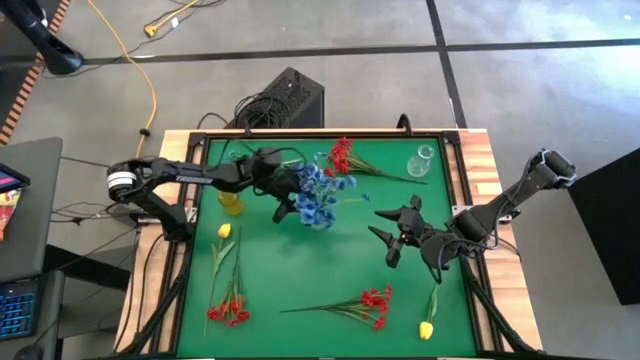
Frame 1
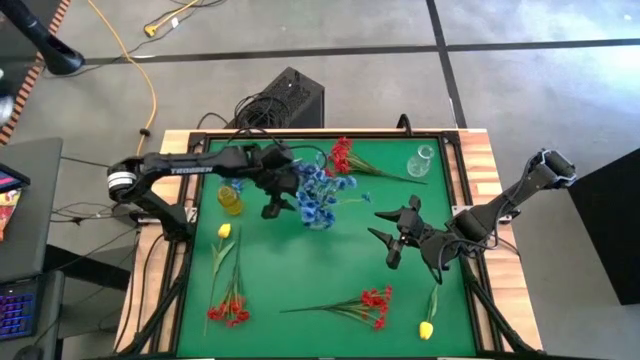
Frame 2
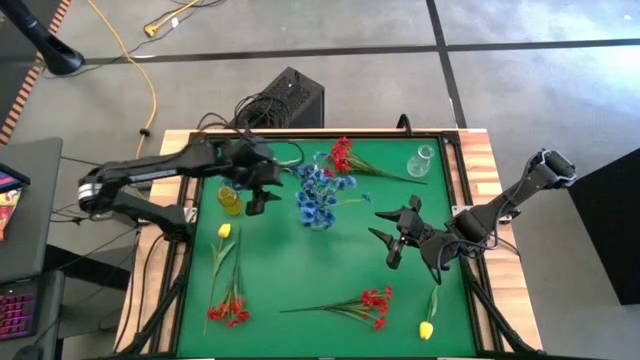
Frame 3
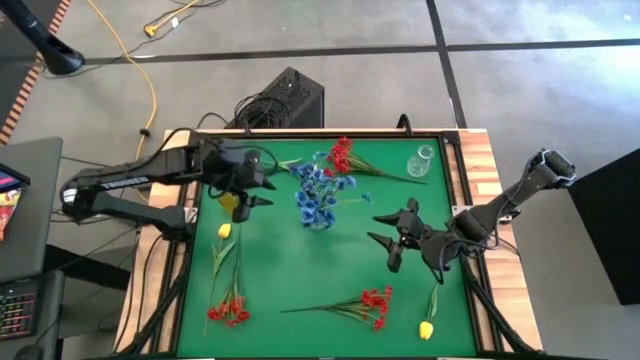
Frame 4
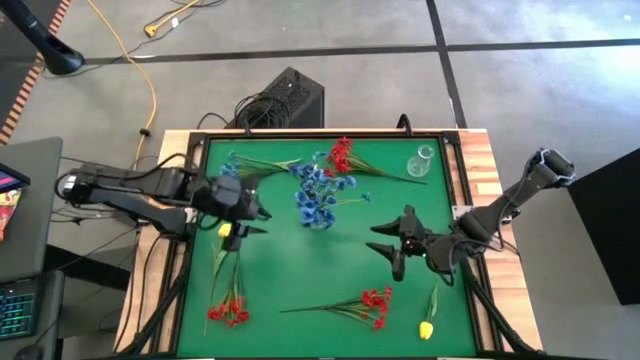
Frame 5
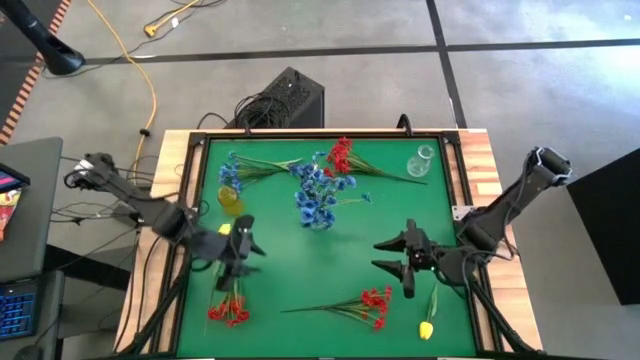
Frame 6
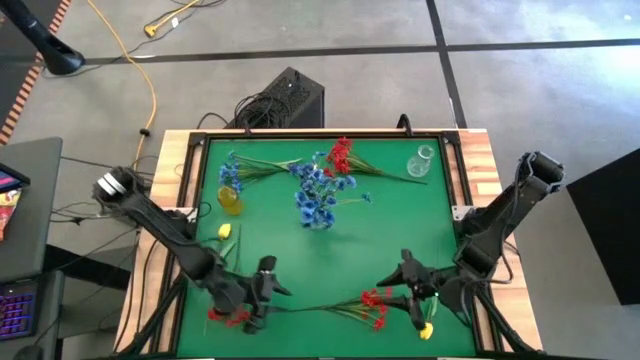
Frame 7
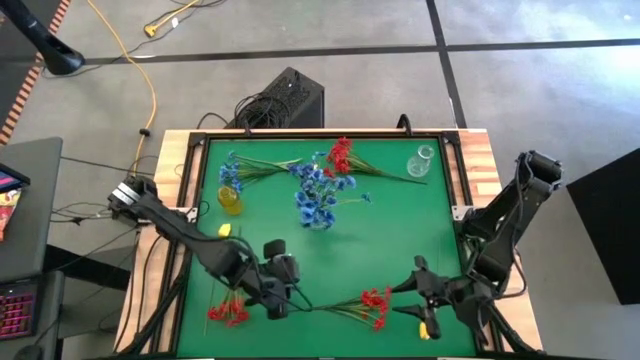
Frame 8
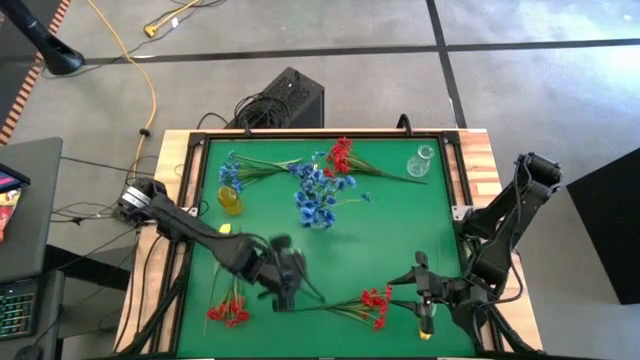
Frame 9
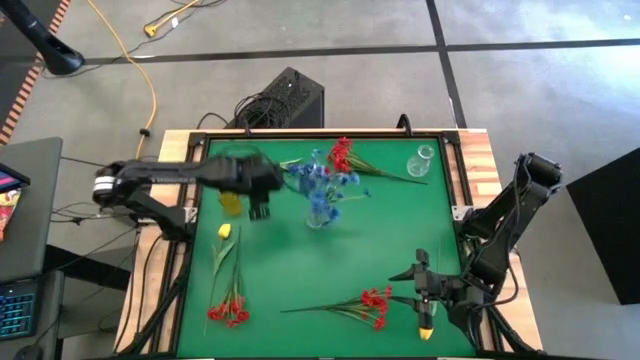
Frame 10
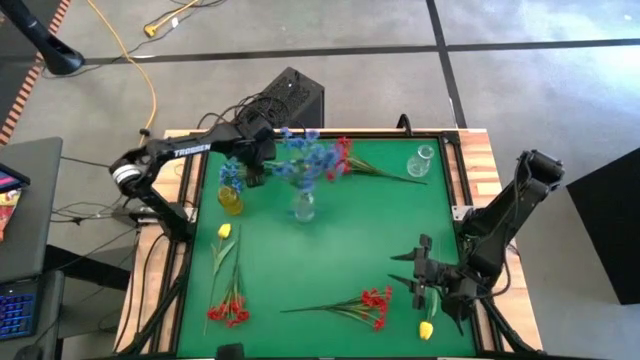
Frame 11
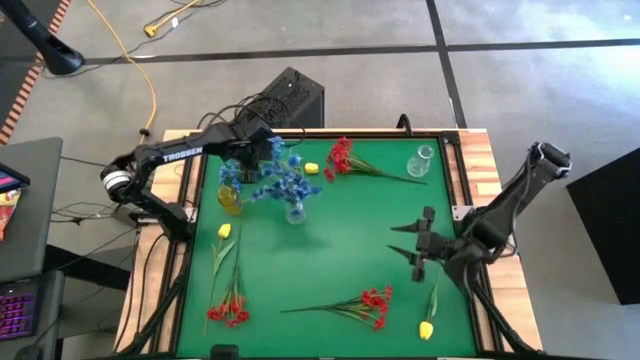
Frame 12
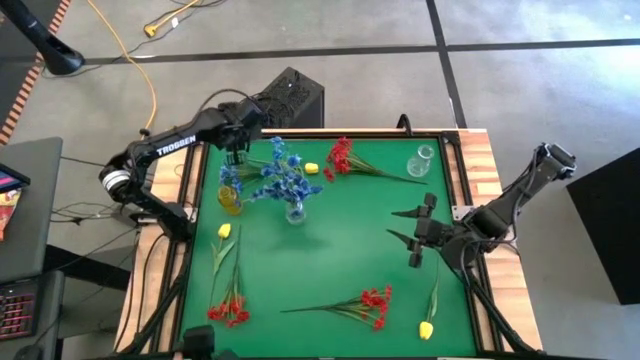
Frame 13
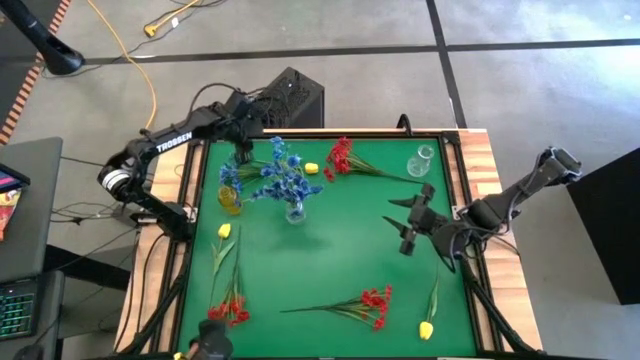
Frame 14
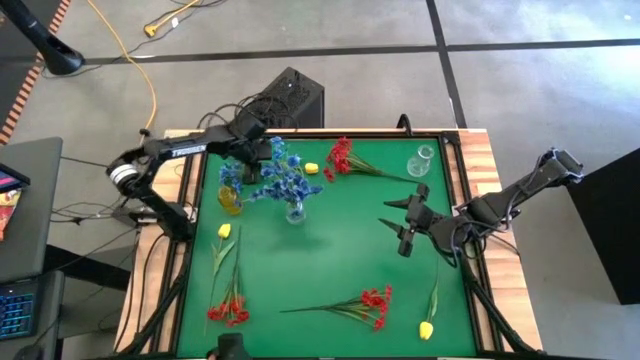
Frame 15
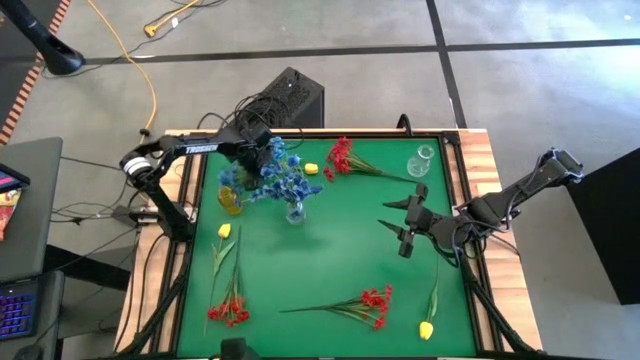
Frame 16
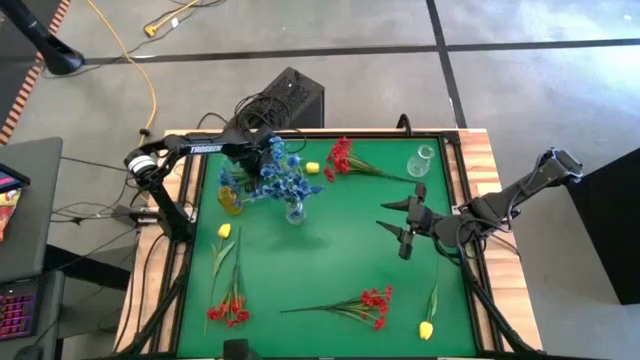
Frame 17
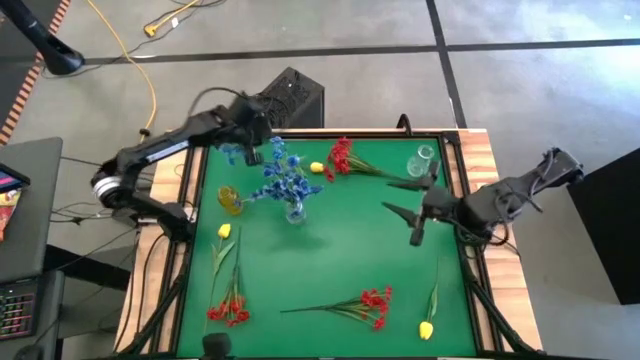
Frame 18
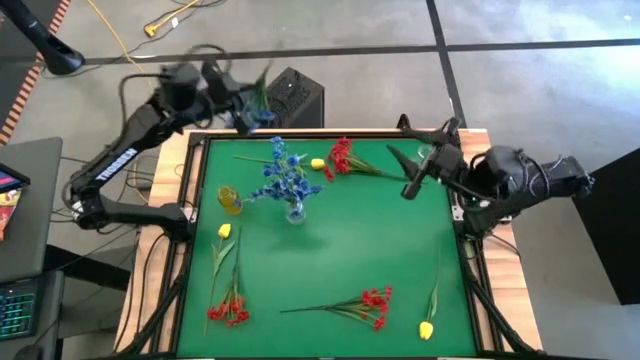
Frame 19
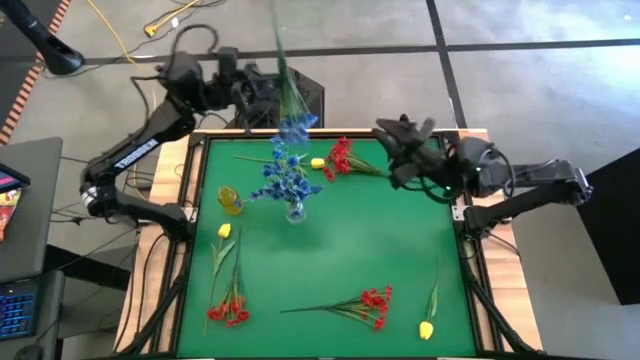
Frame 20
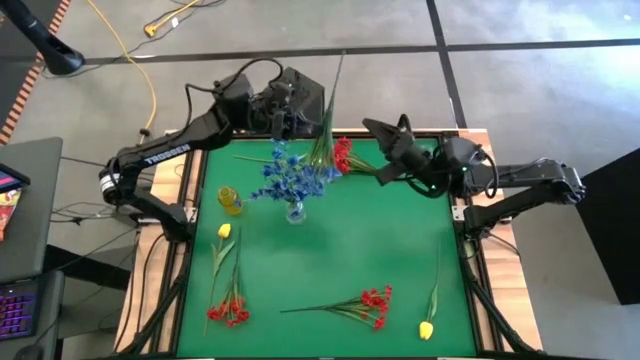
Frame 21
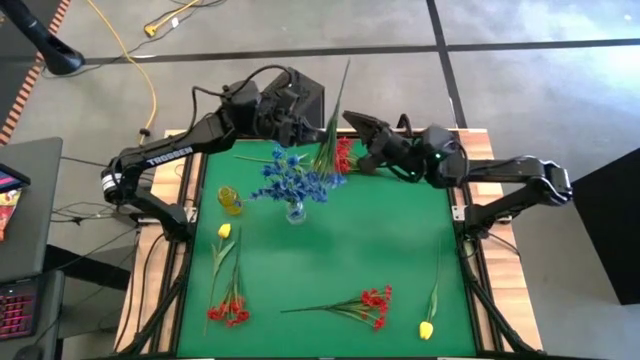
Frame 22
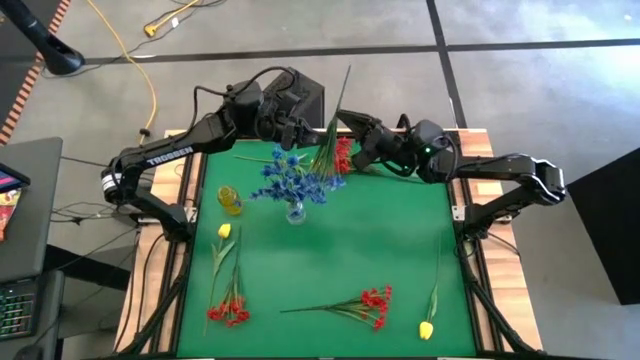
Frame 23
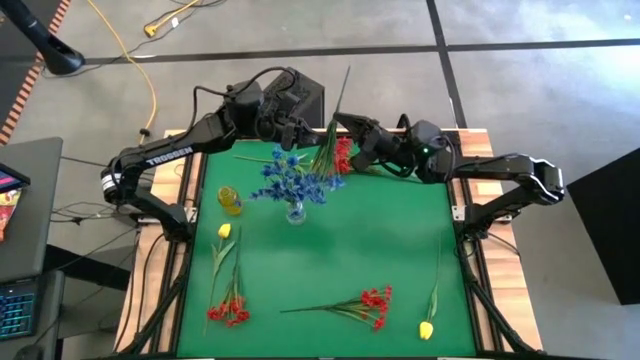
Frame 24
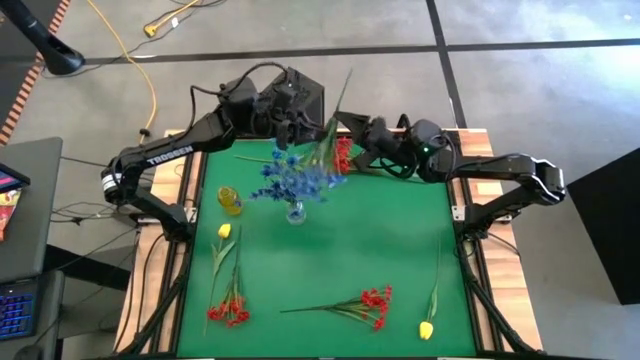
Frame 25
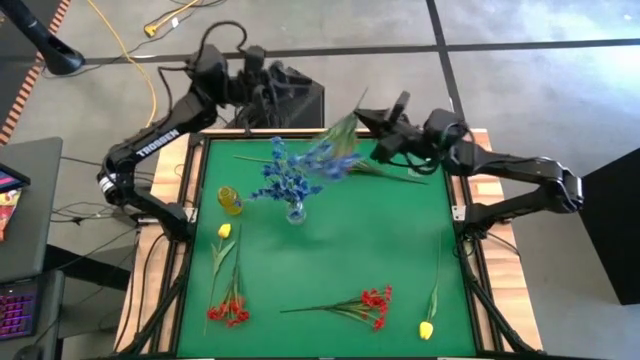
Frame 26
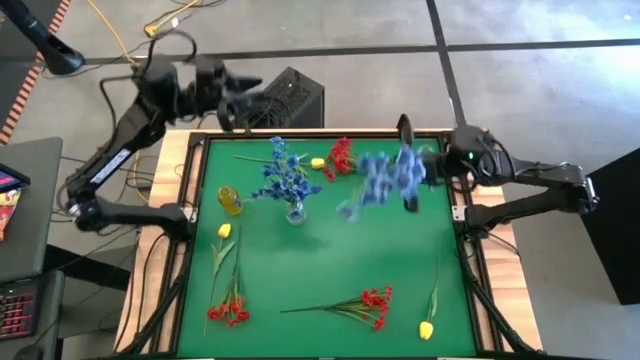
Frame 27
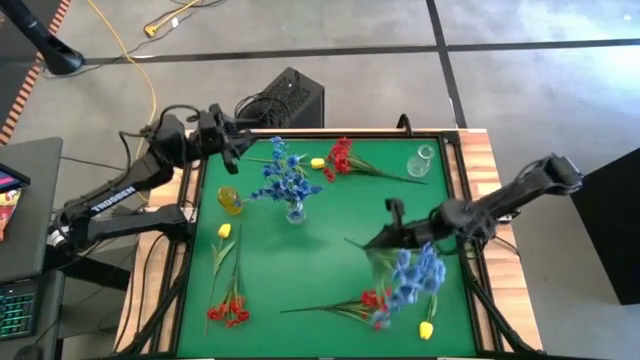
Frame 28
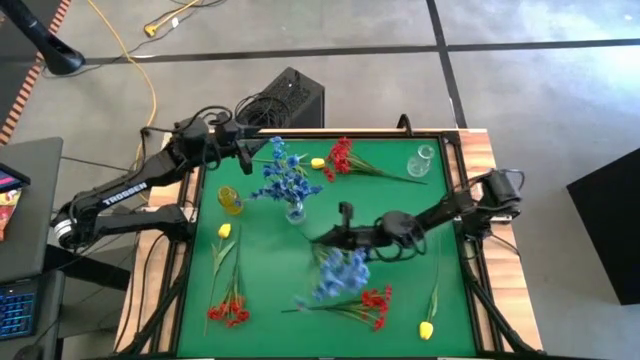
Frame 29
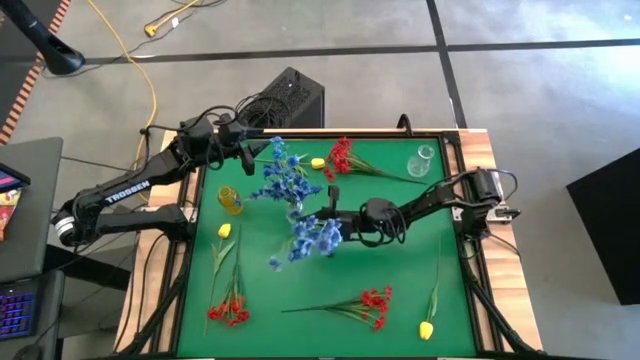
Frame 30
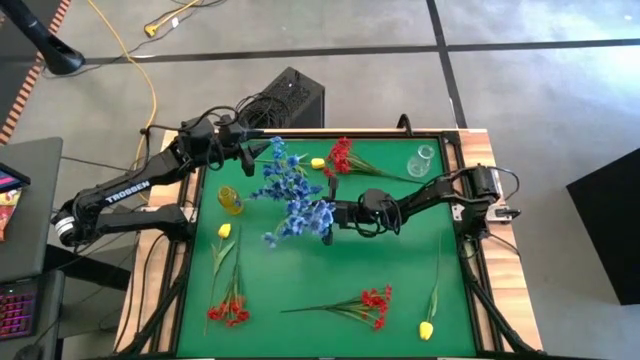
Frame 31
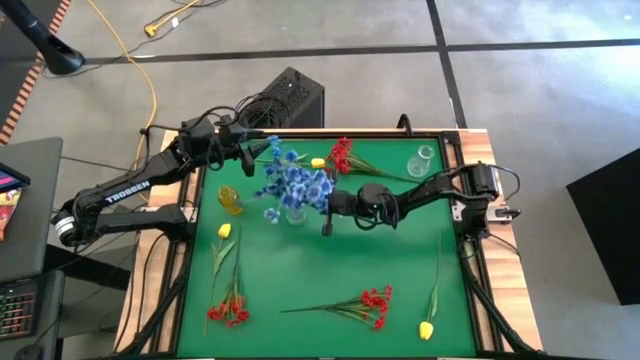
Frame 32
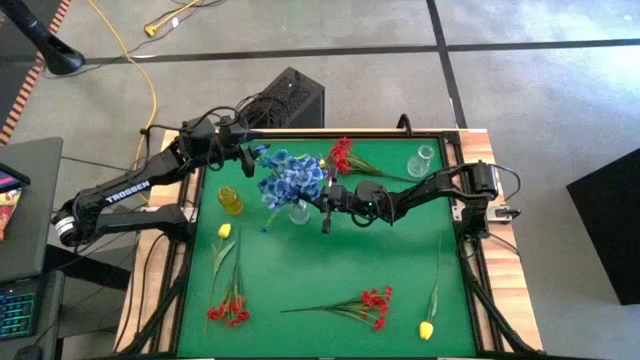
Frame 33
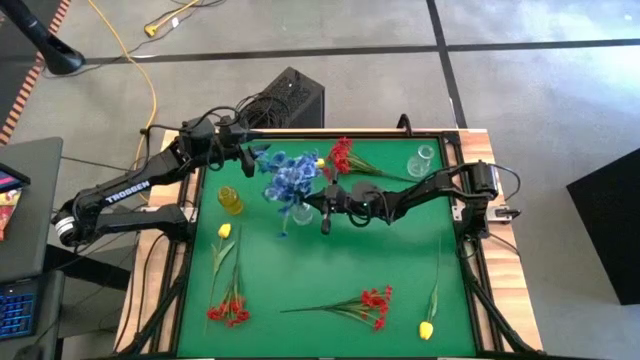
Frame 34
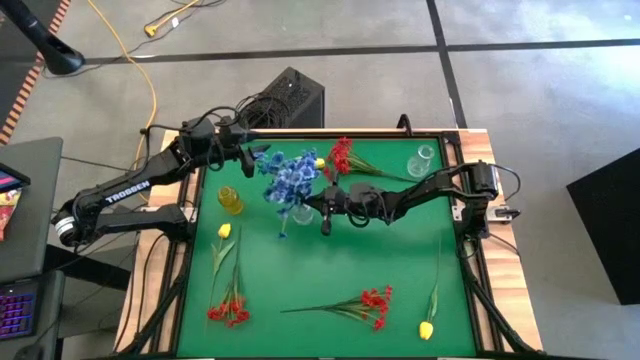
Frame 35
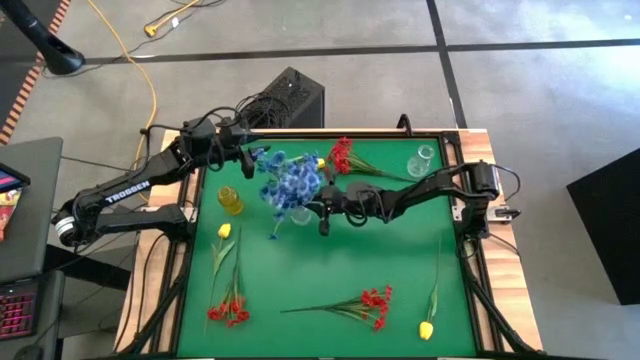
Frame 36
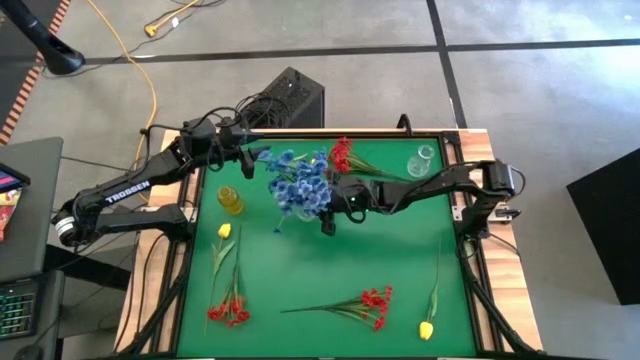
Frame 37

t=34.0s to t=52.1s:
Task: Sort flowers into vase by color
Put the blue flowers into the bottom transparent vase

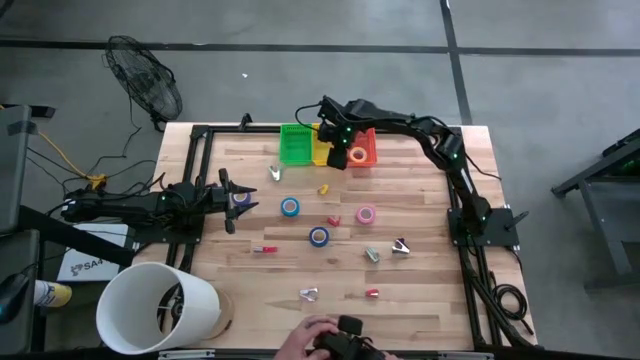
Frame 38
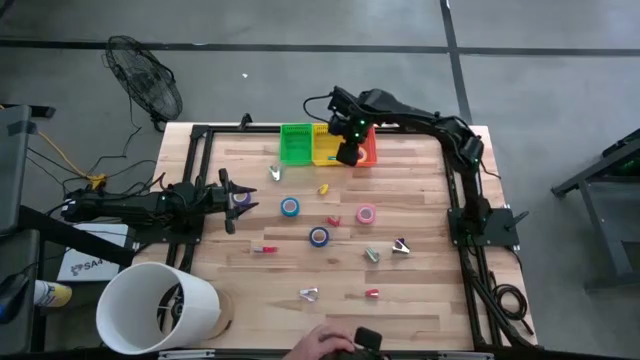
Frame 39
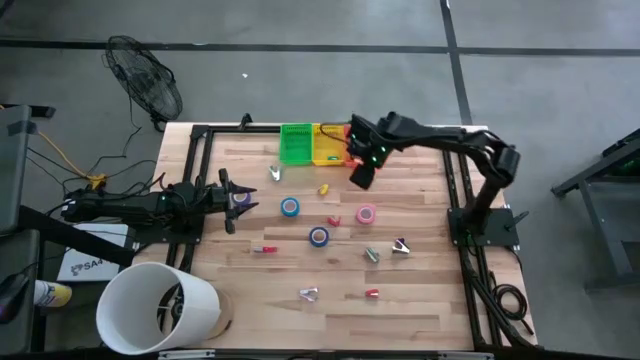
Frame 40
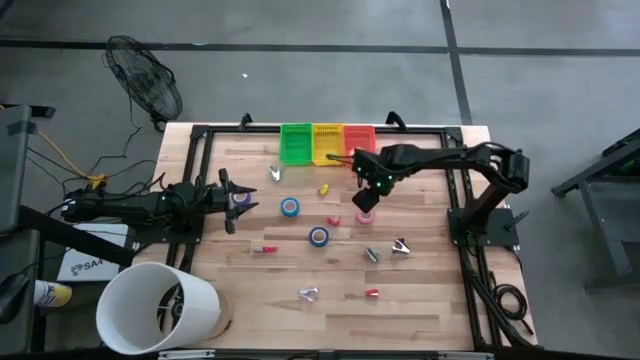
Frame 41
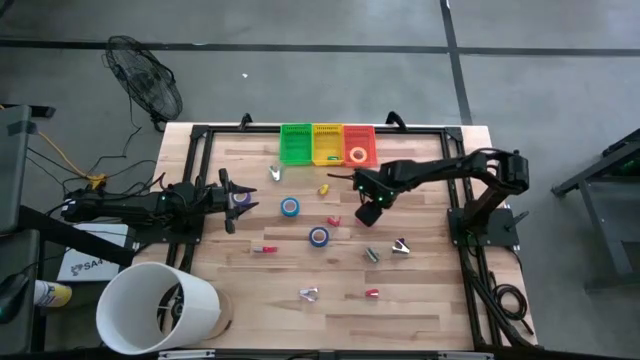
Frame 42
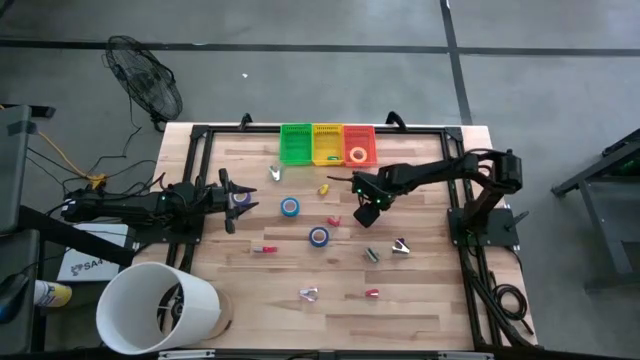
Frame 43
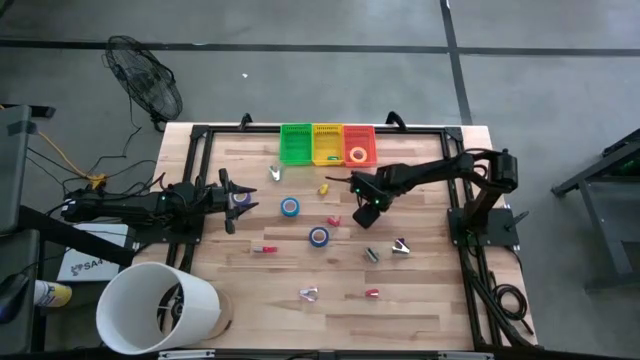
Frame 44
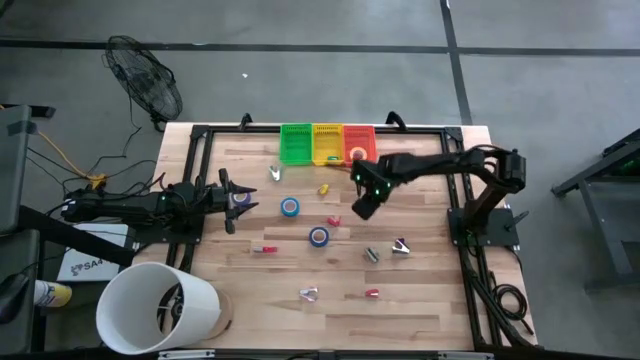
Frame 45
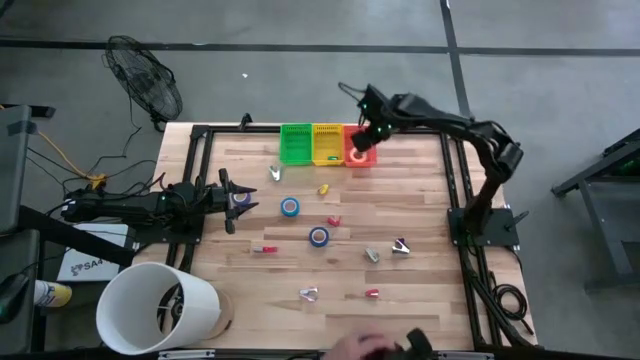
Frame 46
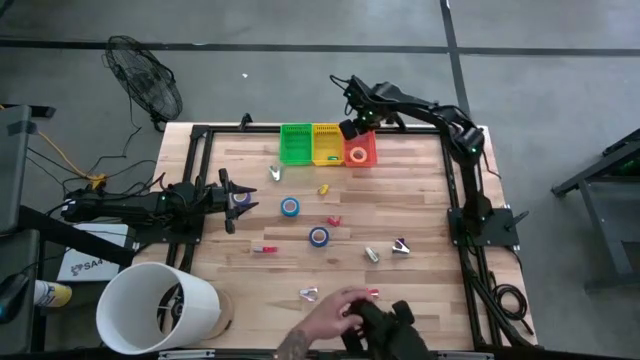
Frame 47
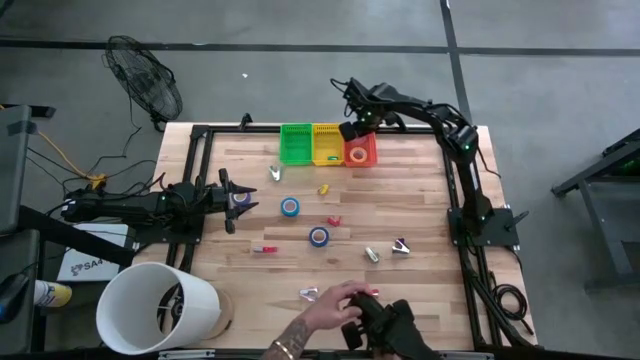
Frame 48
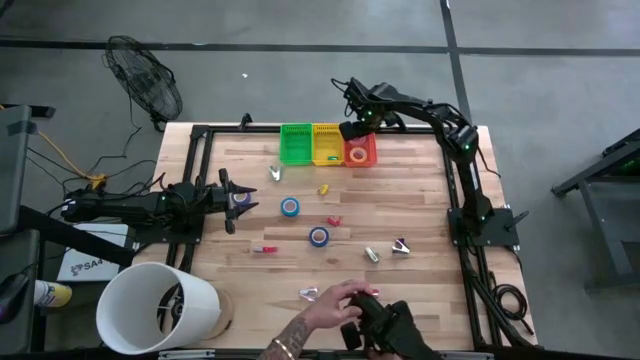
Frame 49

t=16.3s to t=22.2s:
Task: Pick and place Stapler, Stapler remover, tape
Put the pink tape into the orange bin
